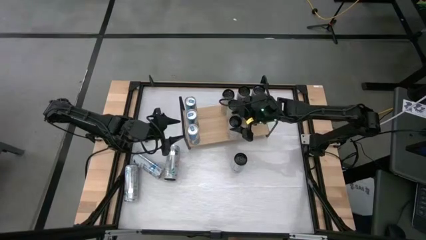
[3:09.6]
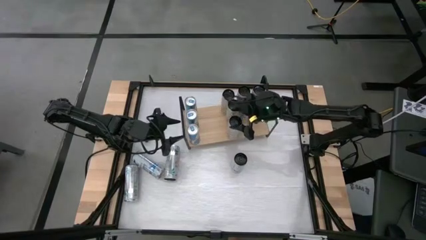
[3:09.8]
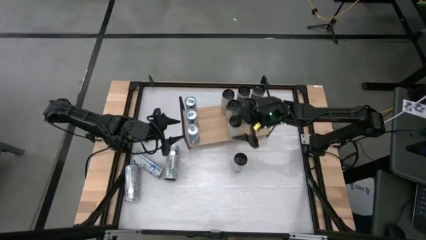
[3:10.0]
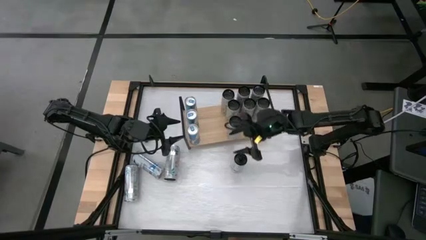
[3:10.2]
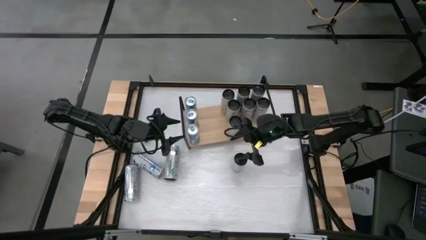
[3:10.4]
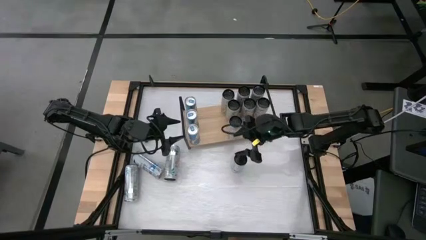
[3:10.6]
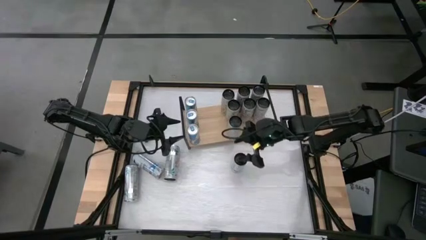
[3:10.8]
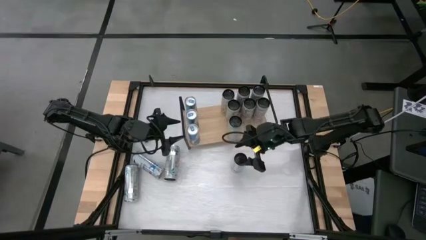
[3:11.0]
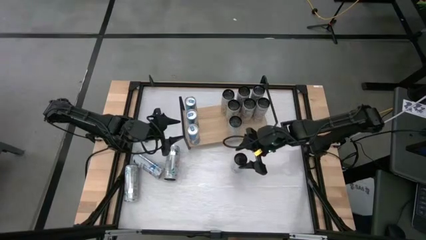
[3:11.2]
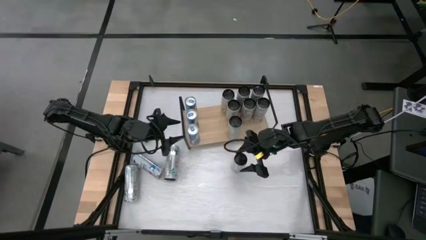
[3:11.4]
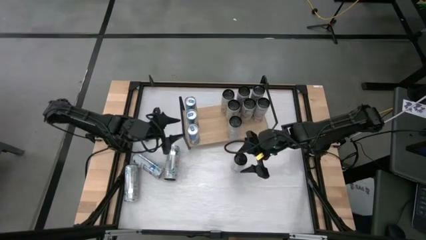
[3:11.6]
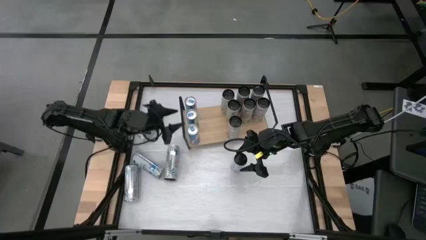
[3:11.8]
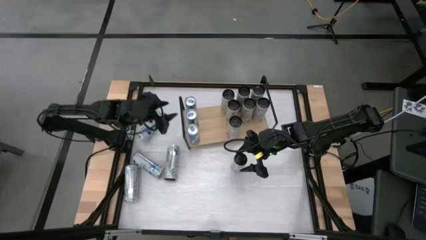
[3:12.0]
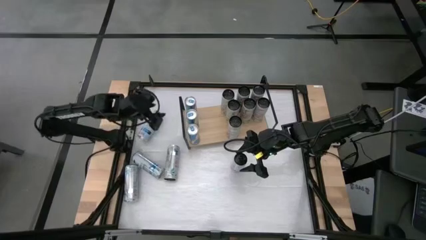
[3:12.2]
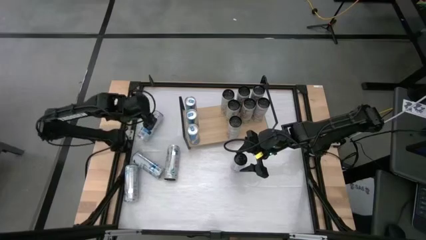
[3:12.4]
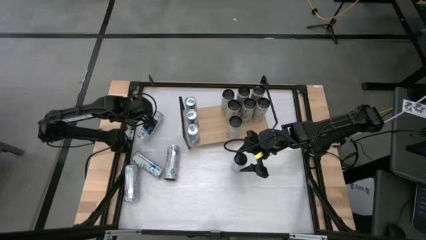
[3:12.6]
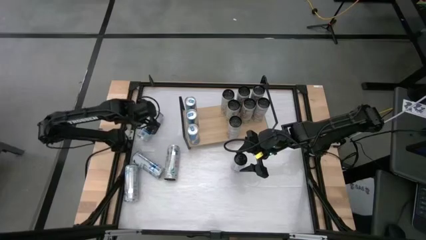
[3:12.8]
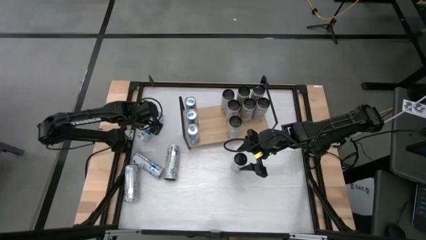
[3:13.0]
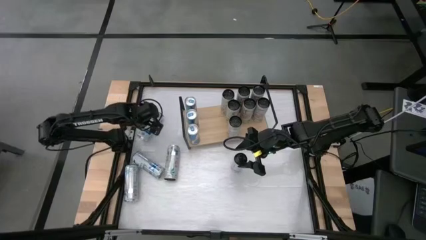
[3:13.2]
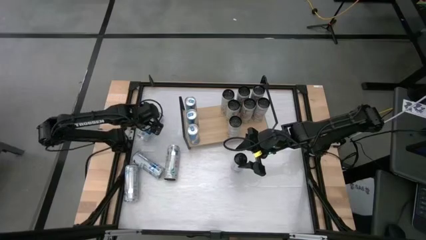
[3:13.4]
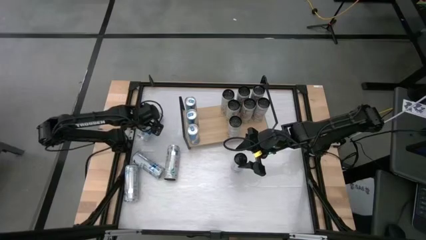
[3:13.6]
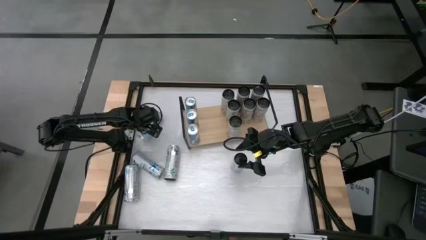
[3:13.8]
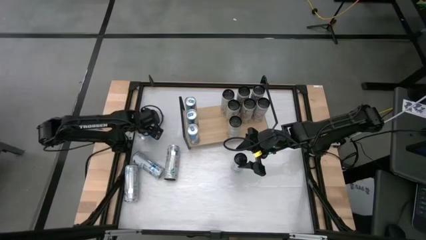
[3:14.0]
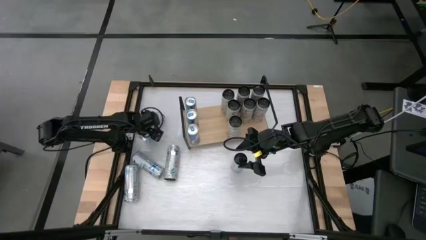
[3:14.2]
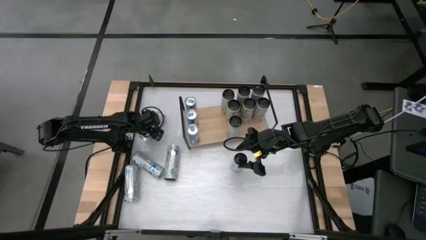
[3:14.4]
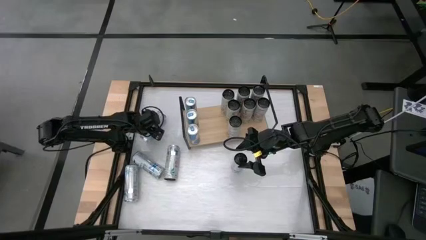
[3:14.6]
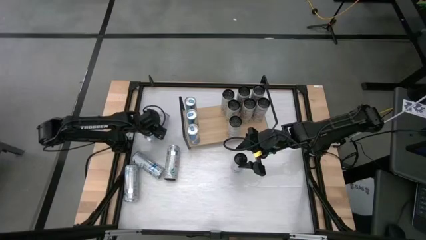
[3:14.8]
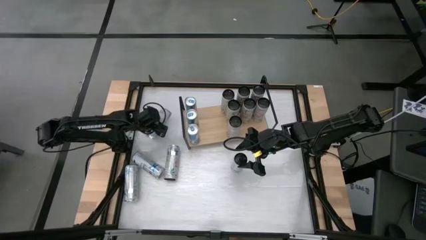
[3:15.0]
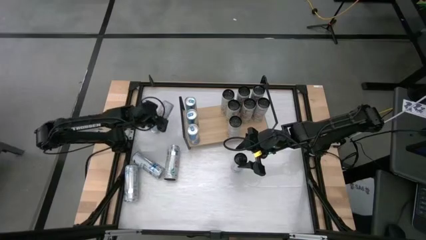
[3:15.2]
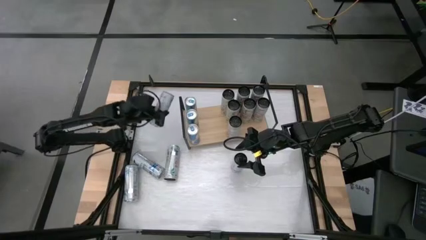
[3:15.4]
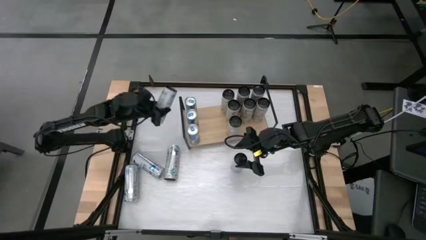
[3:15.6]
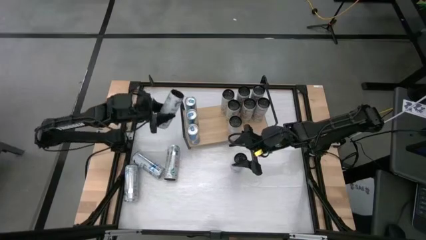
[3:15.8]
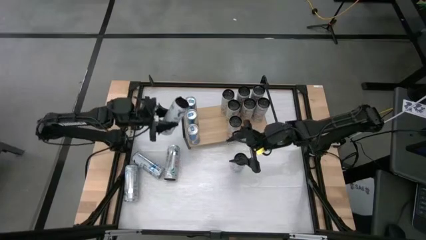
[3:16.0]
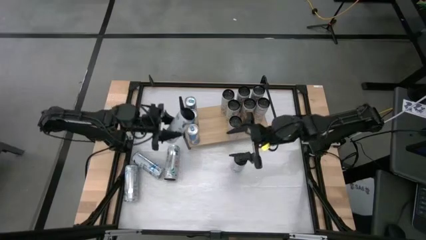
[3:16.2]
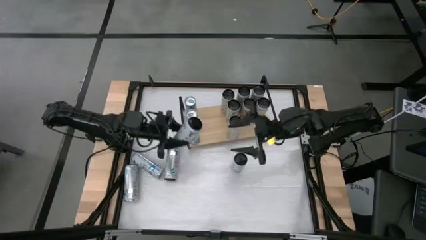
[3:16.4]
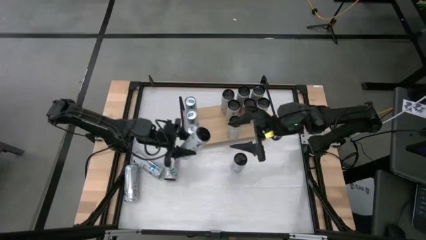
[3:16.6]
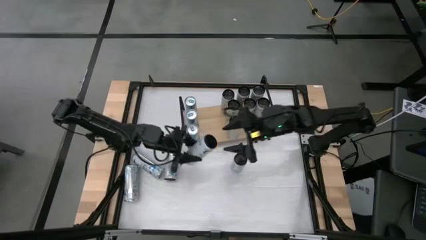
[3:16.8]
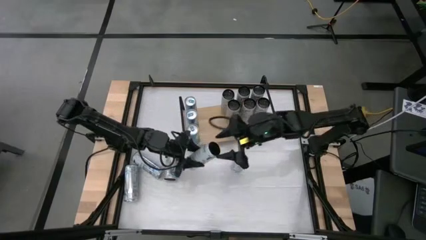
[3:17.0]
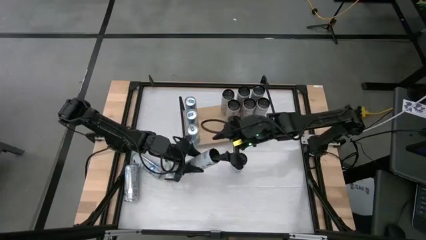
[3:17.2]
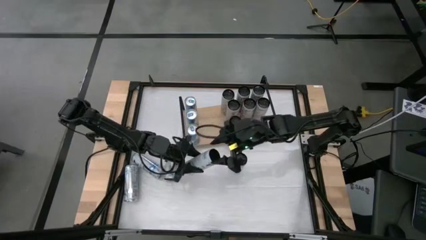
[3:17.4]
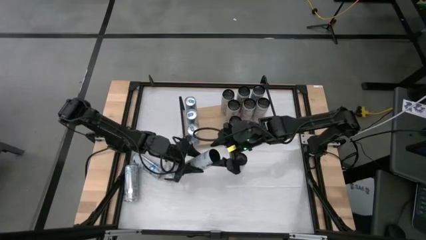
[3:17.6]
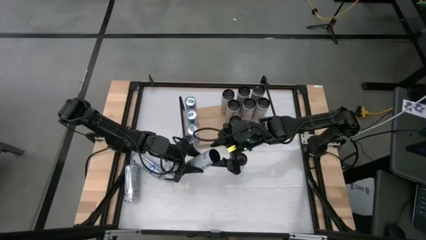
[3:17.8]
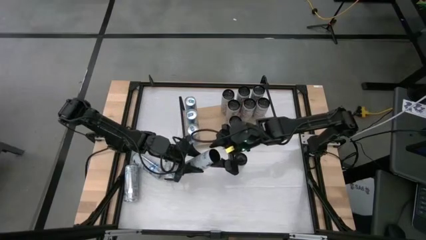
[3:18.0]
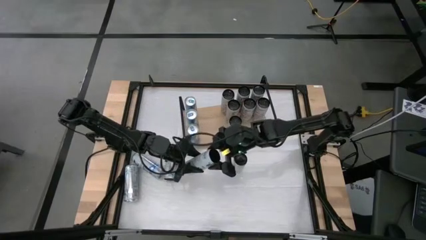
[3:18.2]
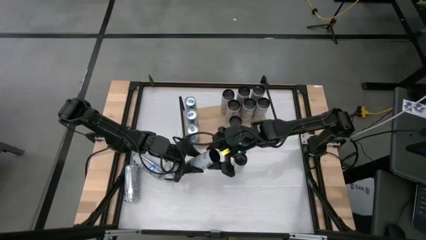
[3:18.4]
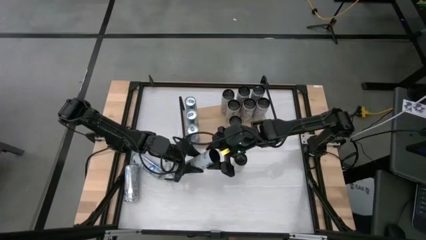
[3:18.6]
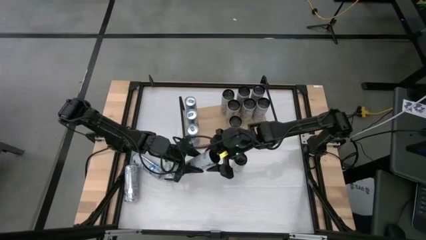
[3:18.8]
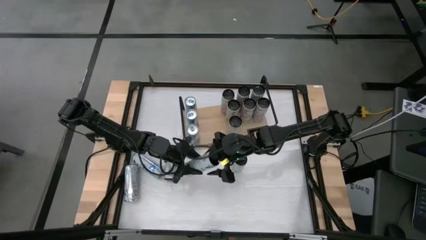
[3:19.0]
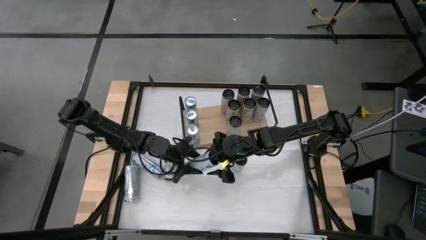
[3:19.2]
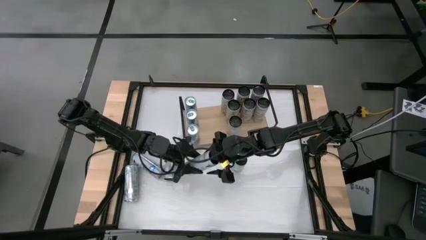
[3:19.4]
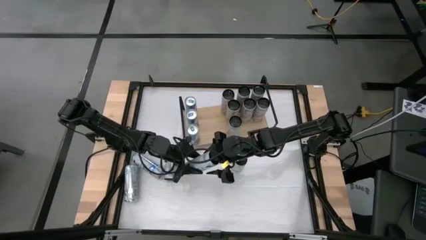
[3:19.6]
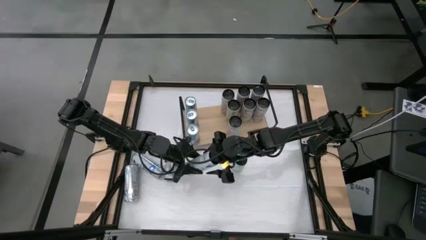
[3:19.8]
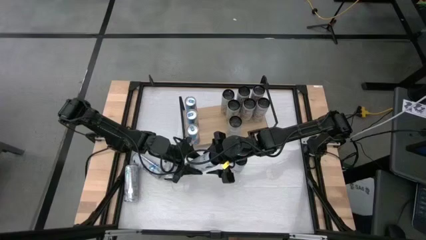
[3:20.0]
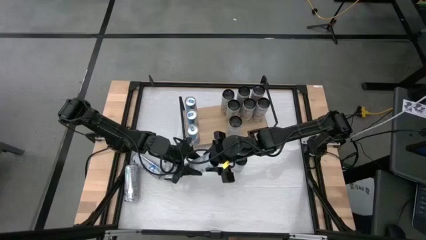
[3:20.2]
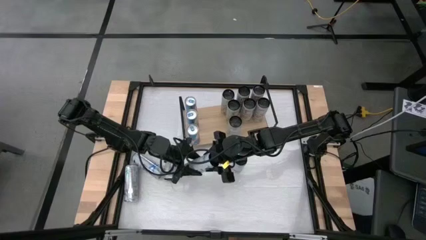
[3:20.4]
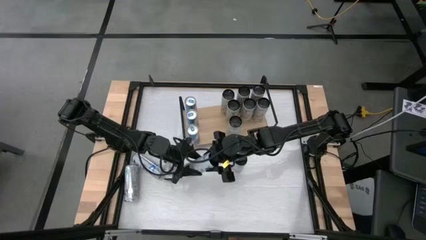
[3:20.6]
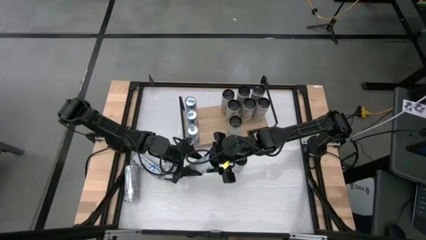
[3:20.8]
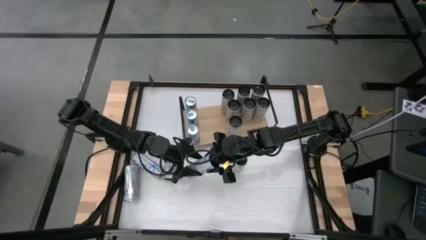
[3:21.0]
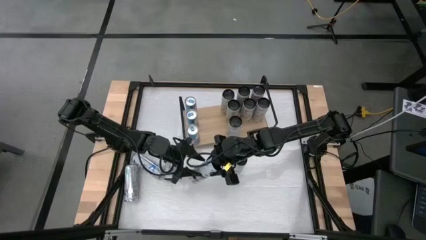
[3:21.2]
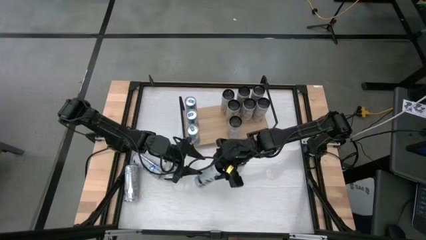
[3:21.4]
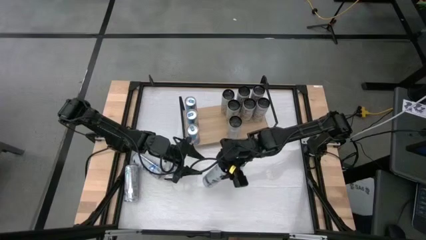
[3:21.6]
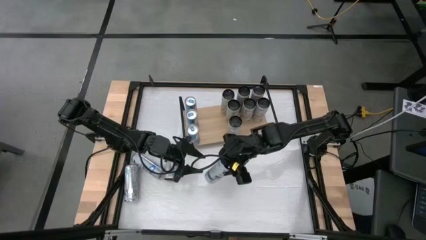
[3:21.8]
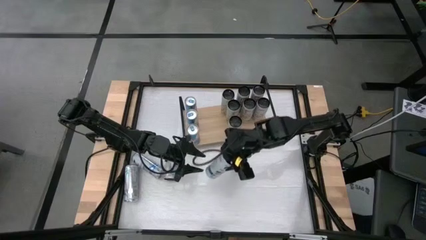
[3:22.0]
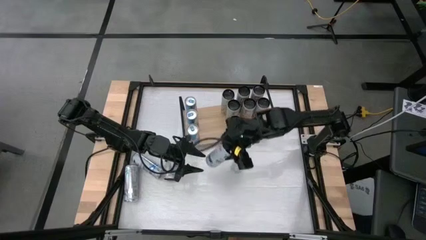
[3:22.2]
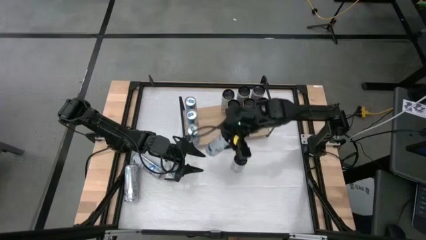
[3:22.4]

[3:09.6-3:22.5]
Task: Place canned beverage on shelf
Put the white-blue soda can on the shelf

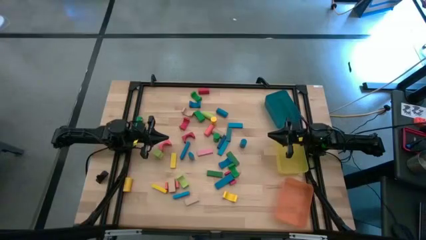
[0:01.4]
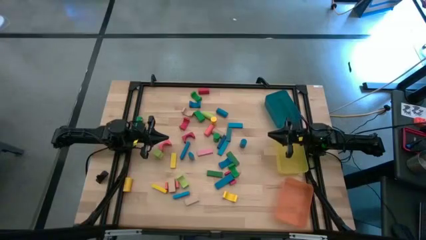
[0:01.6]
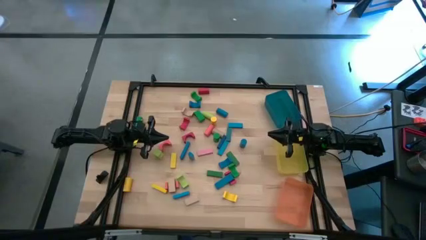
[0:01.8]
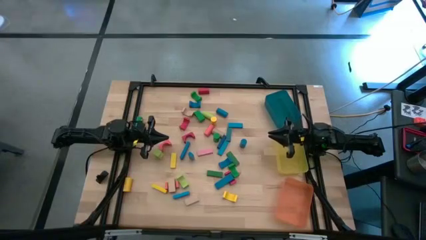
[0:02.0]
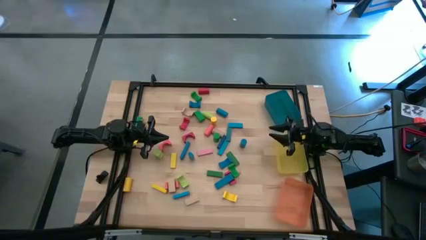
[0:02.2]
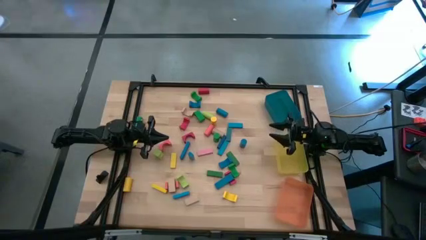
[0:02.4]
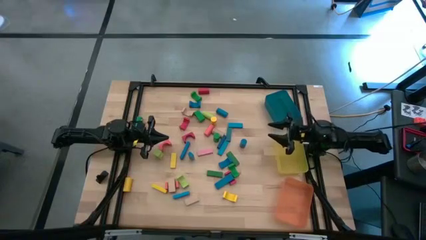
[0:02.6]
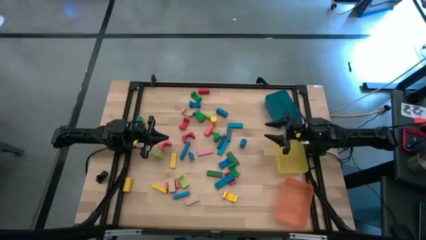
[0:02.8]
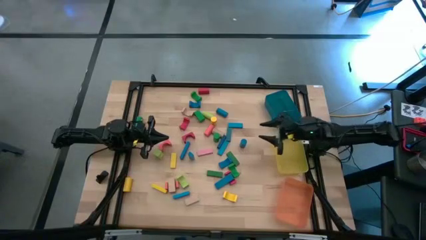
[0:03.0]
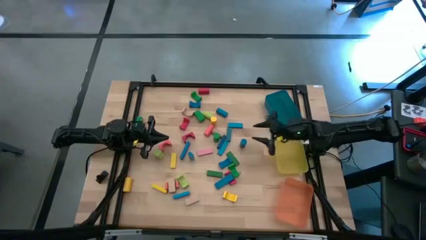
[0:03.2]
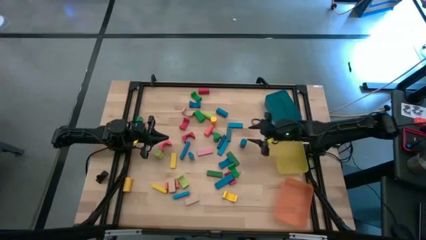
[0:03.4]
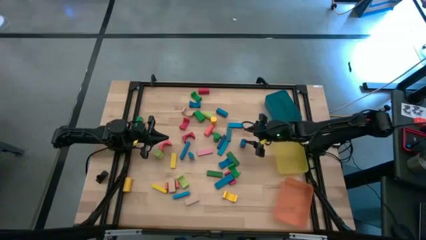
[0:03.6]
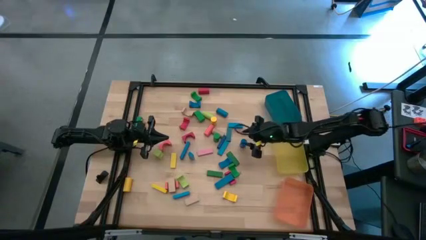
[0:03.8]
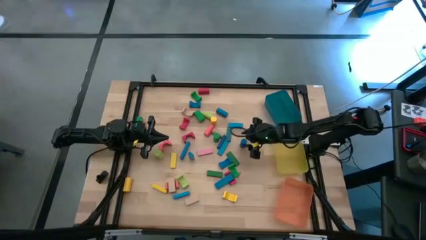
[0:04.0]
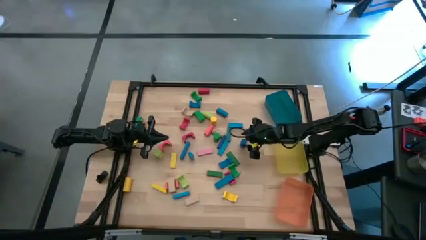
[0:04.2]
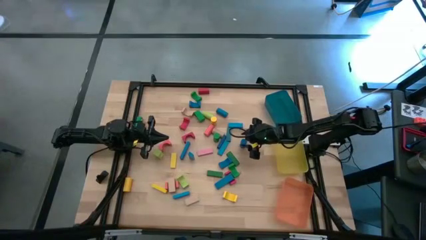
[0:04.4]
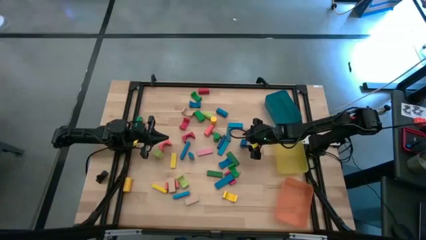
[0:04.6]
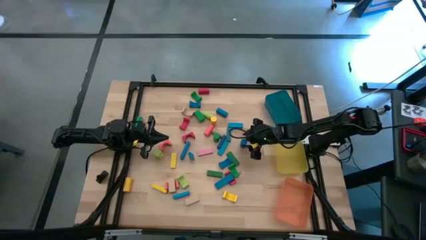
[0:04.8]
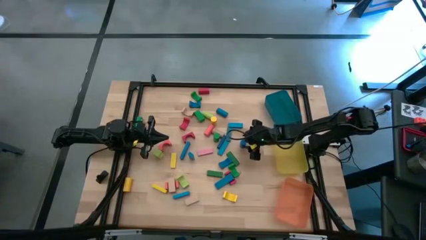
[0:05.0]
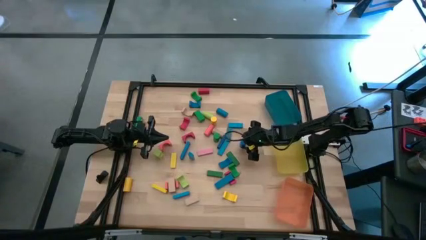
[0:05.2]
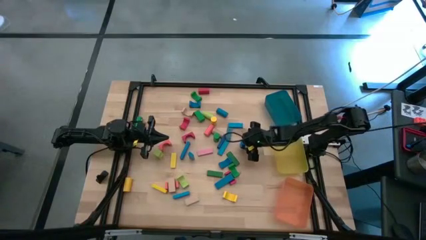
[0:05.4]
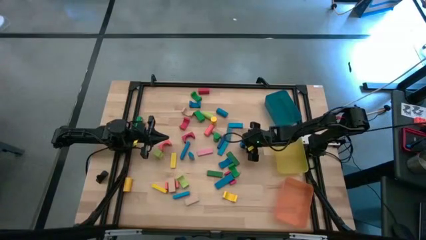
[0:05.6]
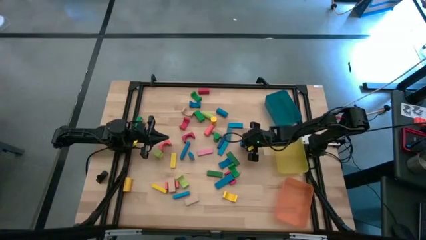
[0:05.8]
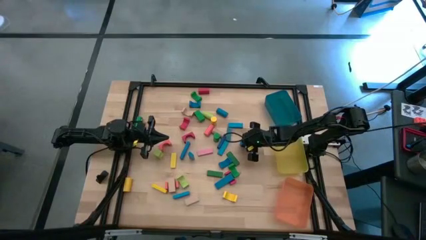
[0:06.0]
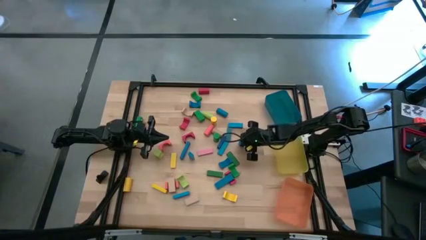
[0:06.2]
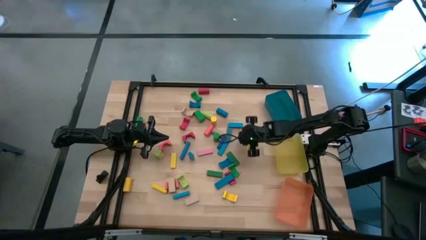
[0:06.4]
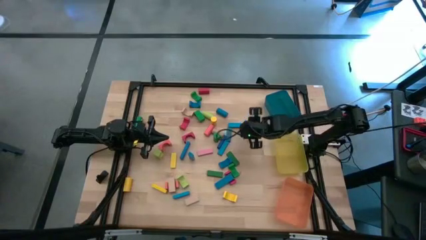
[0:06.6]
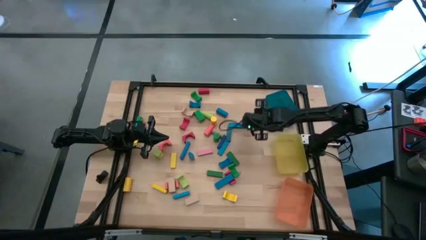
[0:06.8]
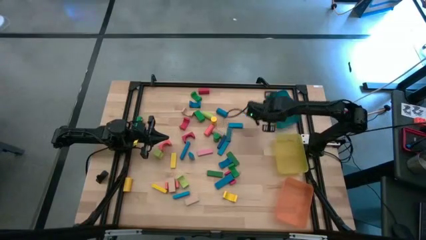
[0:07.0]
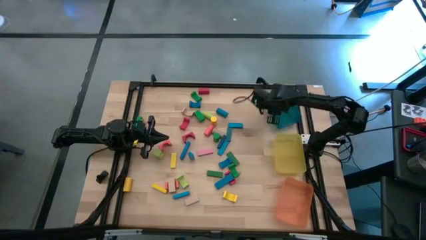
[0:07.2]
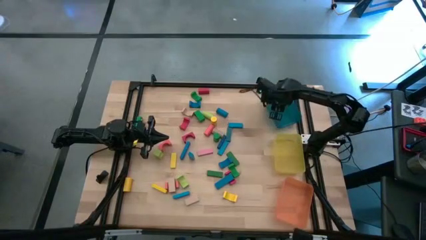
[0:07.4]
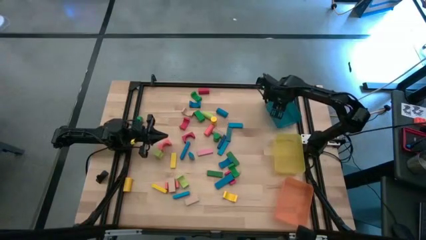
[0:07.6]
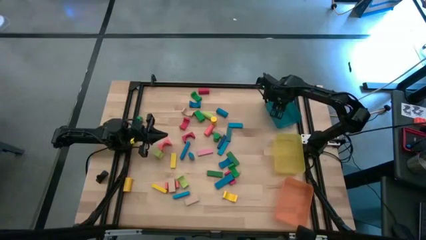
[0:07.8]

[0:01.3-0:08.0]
Task: Sort blocks by size
Put the blue cylindrical block into the blue bin
